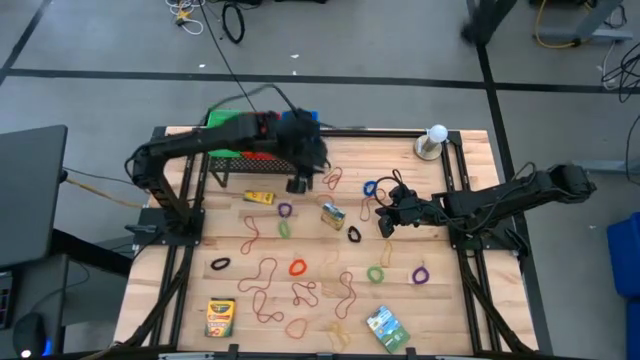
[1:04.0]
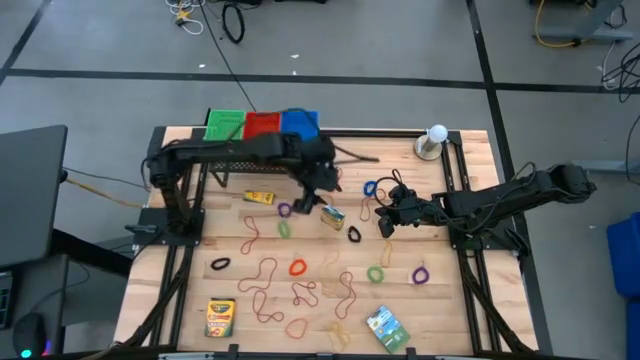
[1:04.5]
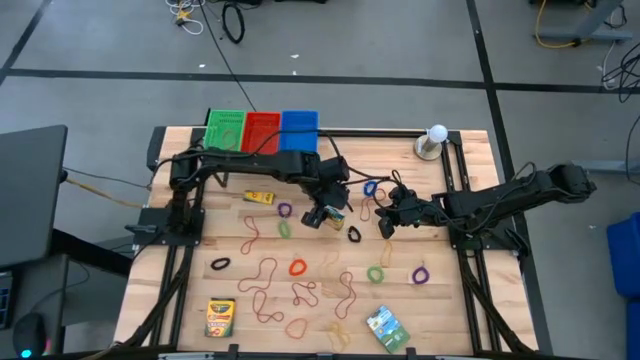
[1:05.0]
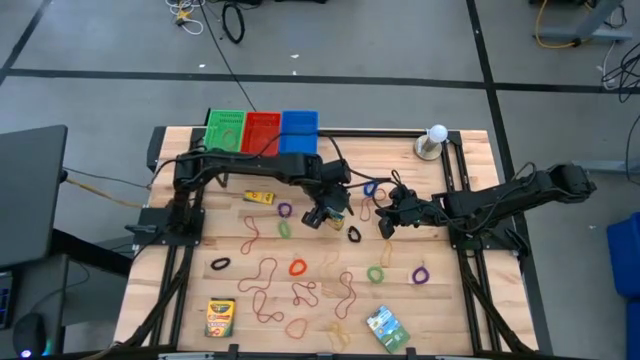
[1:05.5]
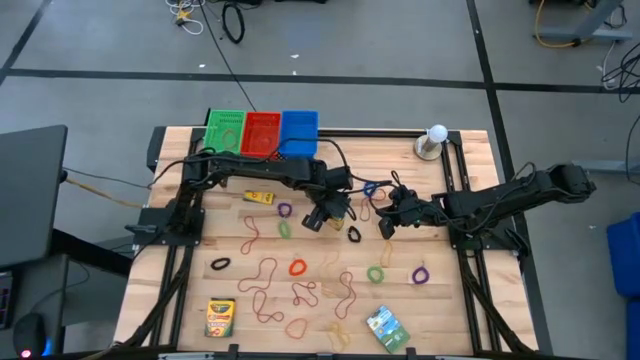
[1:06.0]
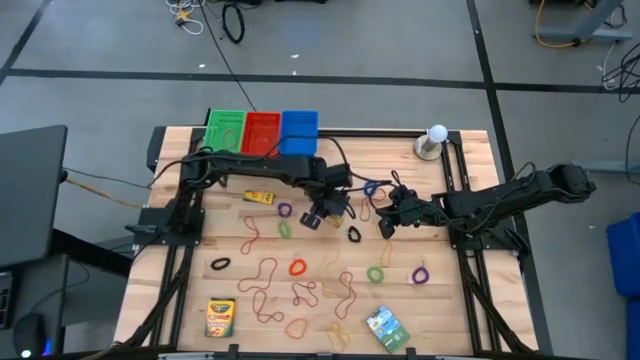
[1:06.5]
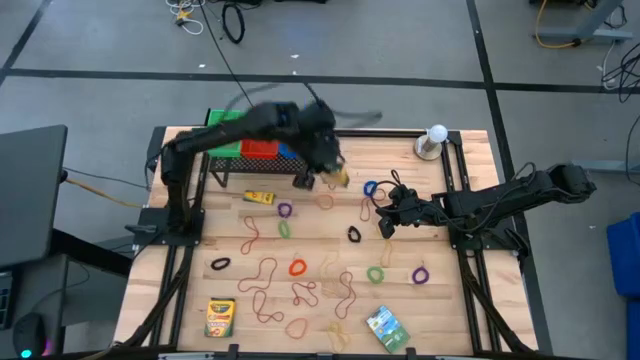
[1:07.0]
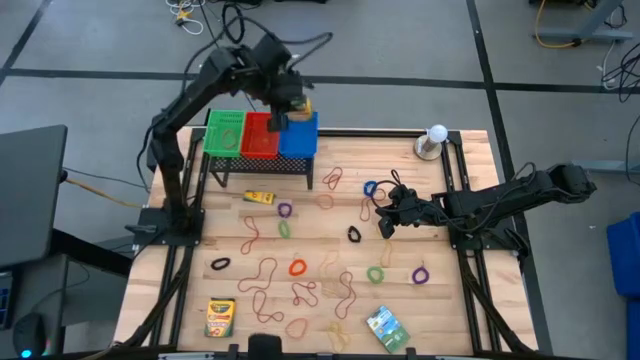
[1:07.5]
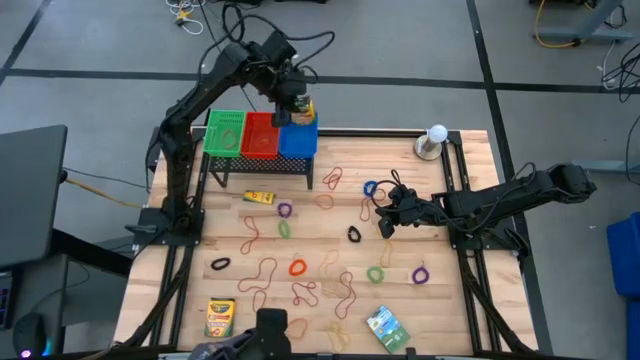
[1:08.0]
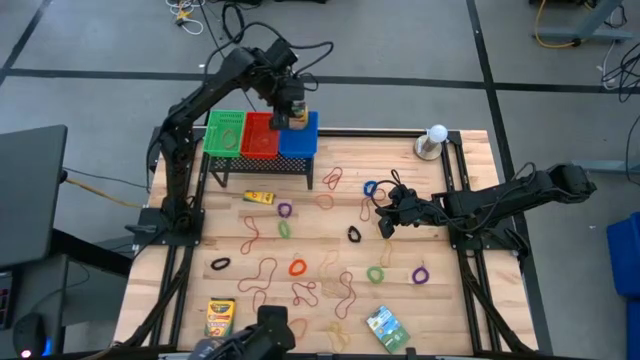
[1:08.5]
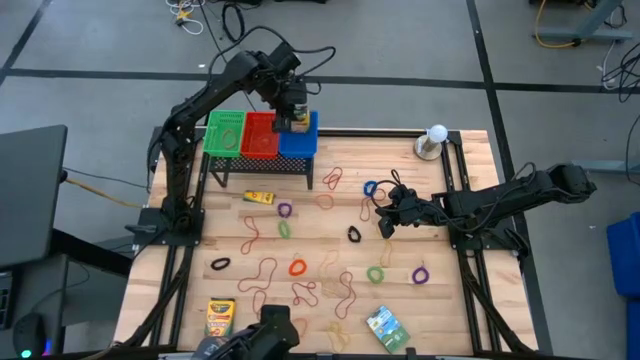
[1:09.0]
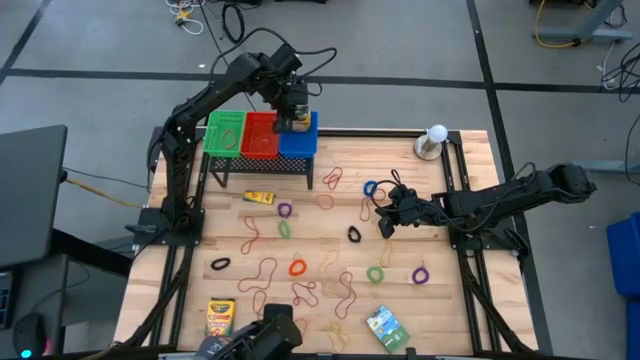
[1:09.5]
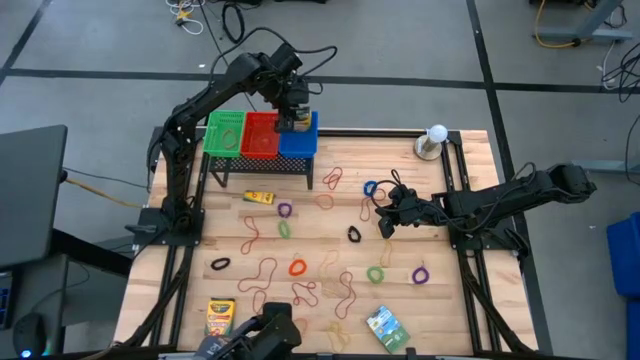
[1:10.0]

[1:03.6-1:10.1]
Task: Pick & Place Office Desk Supplies
Put the big box of crayons into the blue bin on the shelf

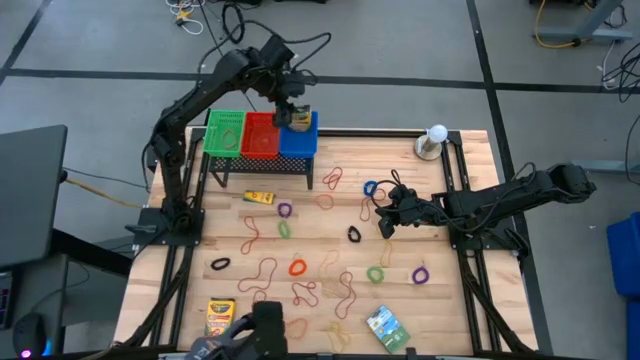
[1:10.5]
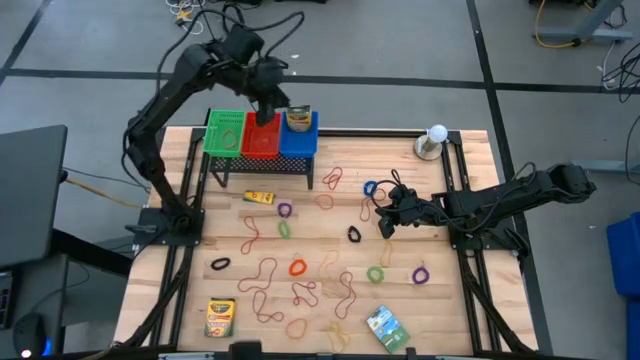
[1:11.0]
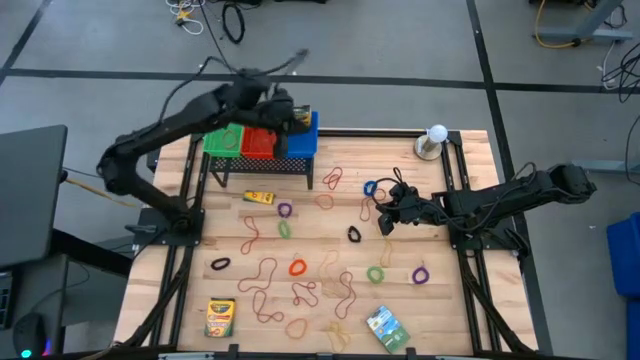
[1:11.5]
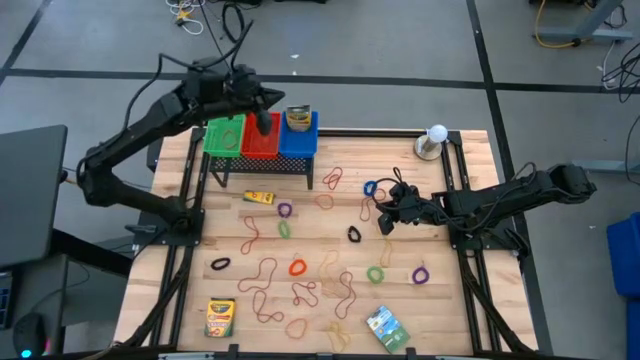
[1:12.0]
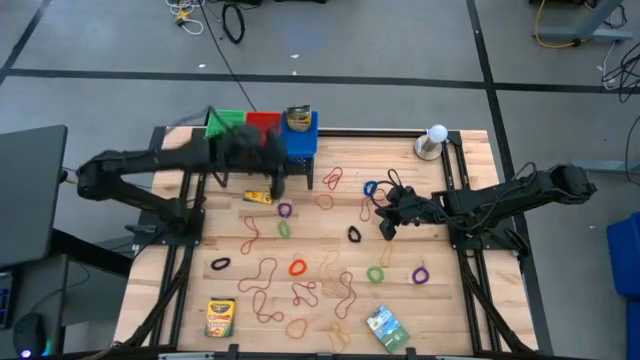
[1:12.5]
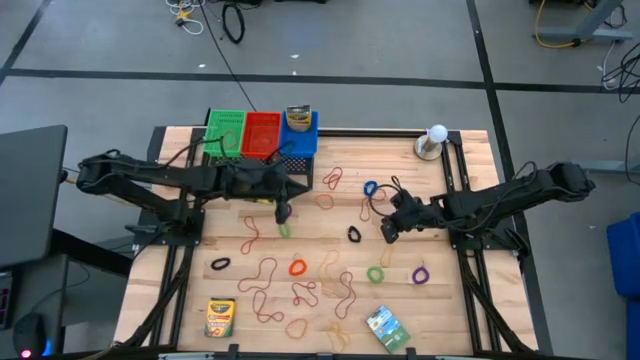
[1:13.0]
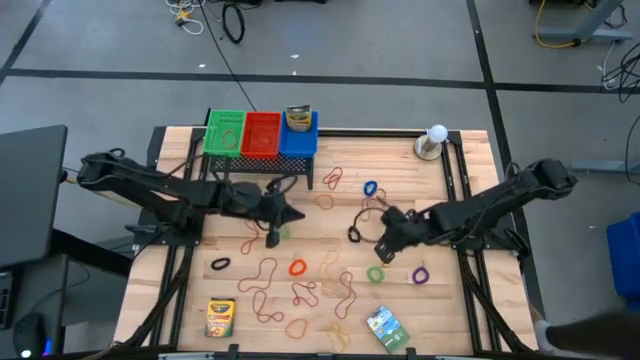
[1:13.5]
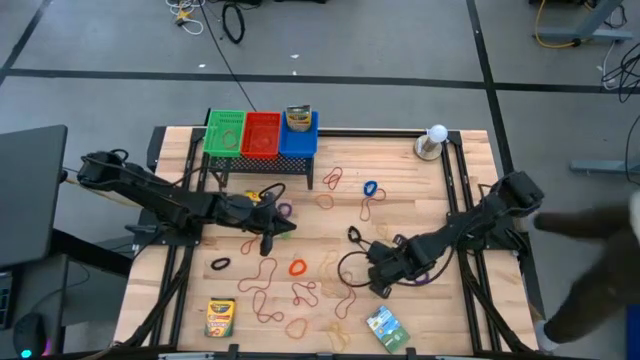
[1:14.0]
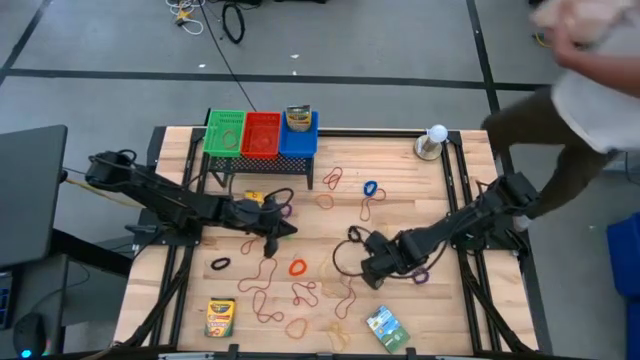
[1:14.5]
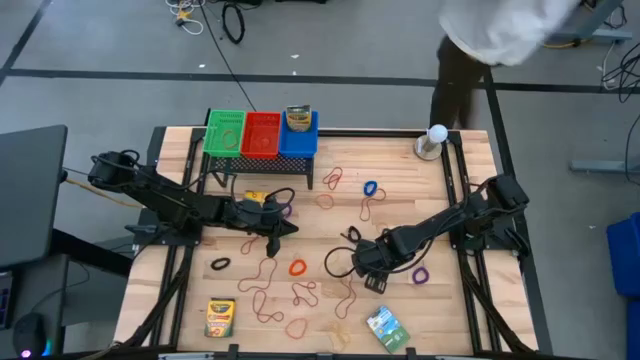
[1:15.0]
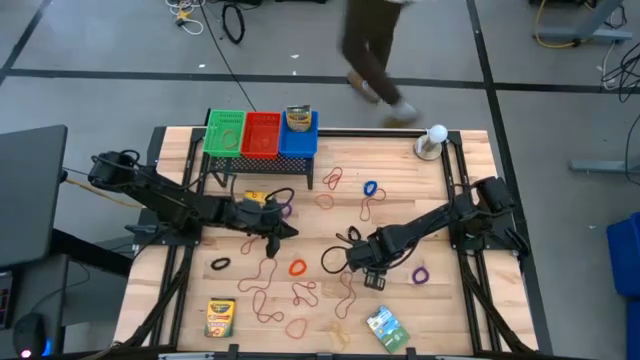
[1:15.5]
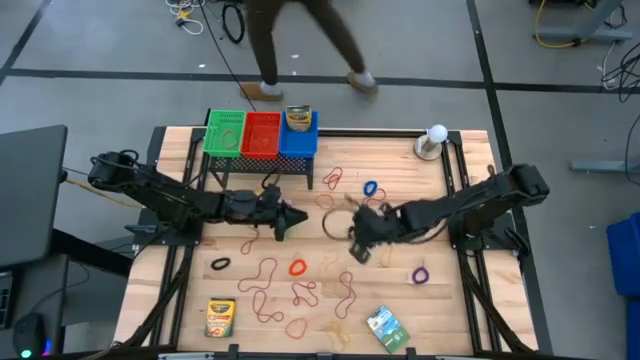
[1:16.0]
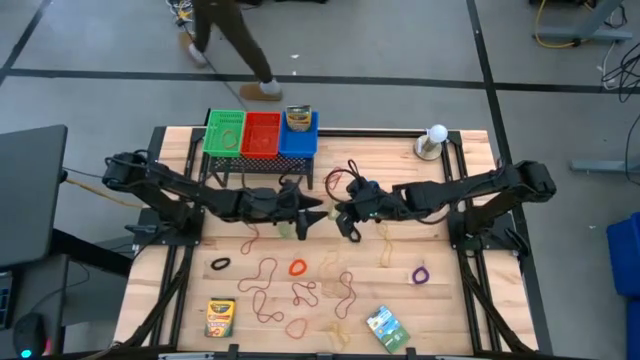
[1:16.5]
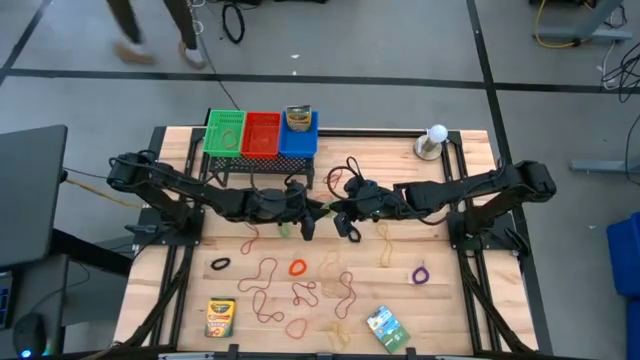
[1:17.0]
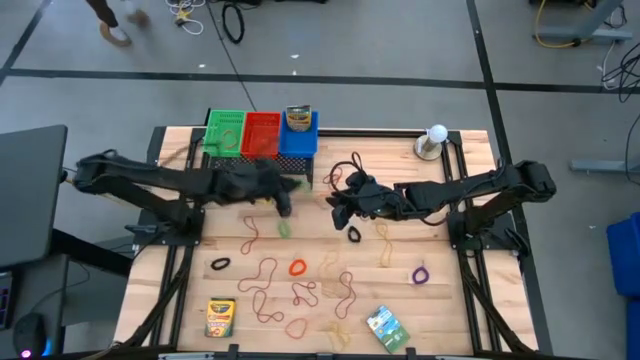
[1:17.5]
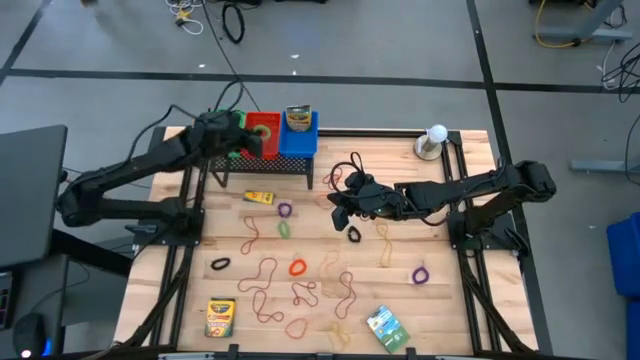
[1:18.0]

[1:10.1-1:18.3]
Put the green spring rubber band into the red bin on the shelf

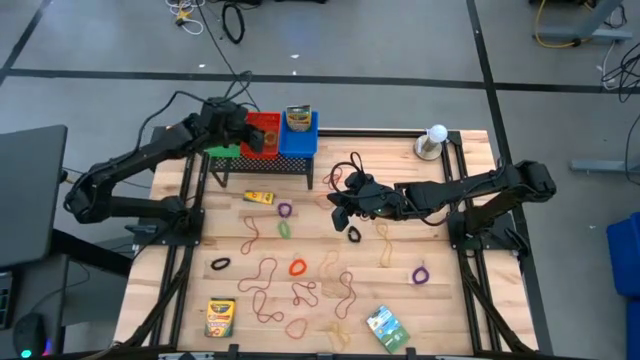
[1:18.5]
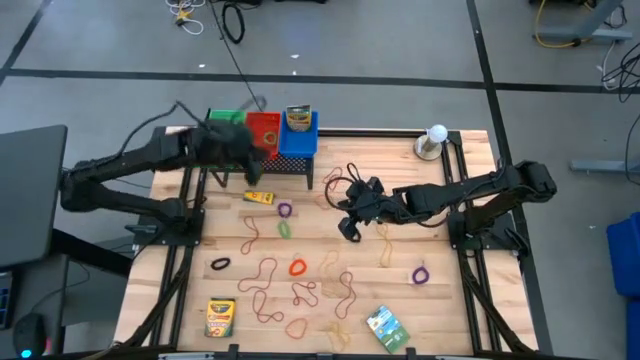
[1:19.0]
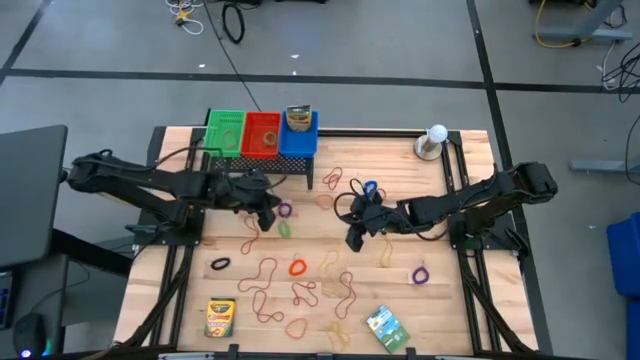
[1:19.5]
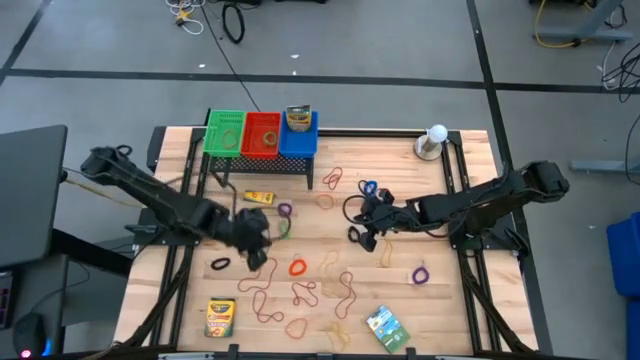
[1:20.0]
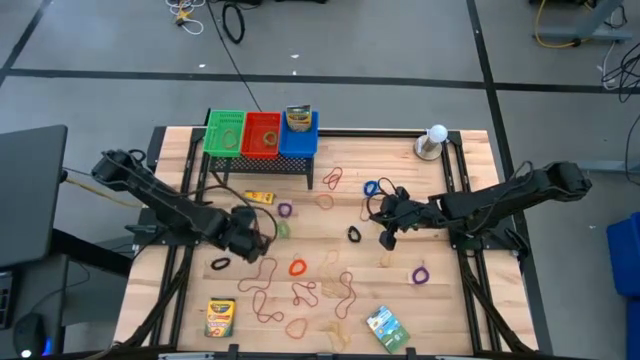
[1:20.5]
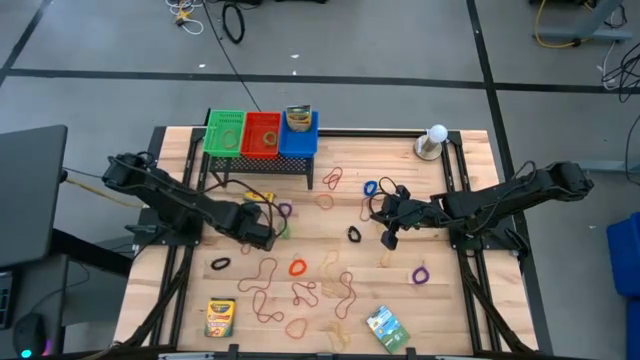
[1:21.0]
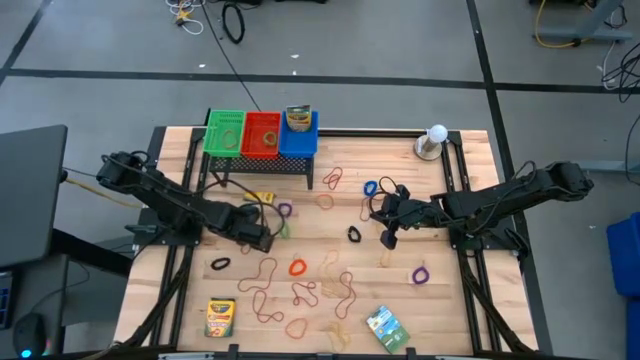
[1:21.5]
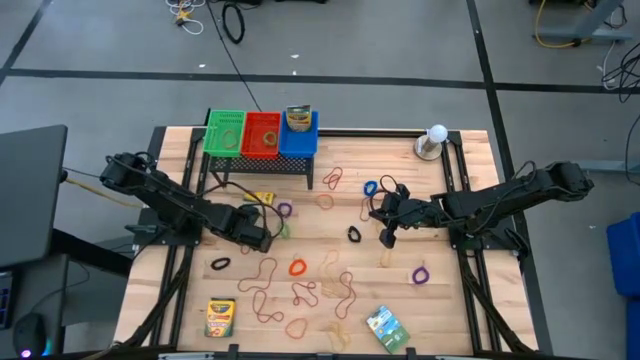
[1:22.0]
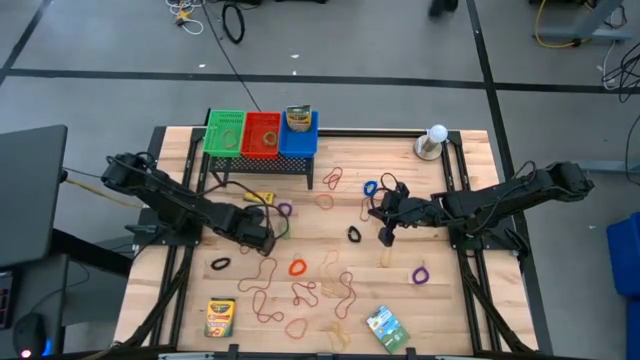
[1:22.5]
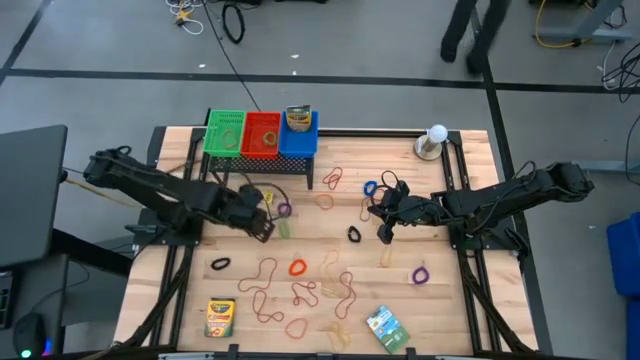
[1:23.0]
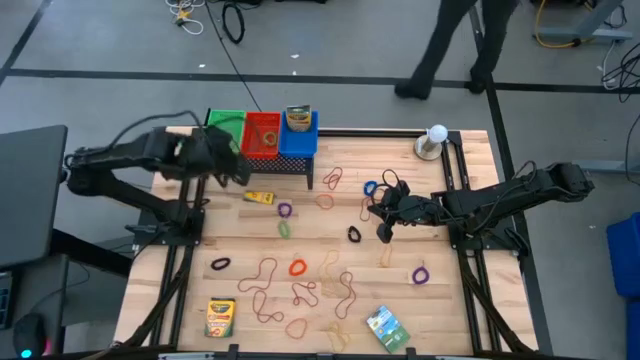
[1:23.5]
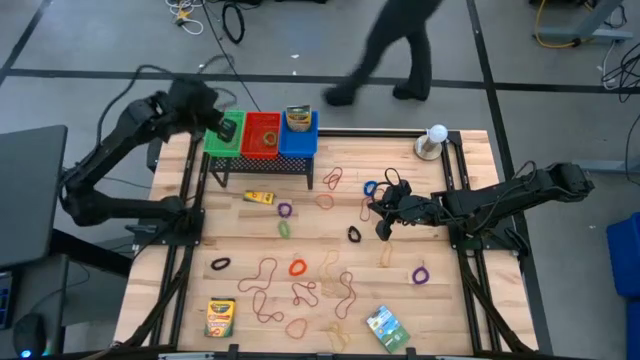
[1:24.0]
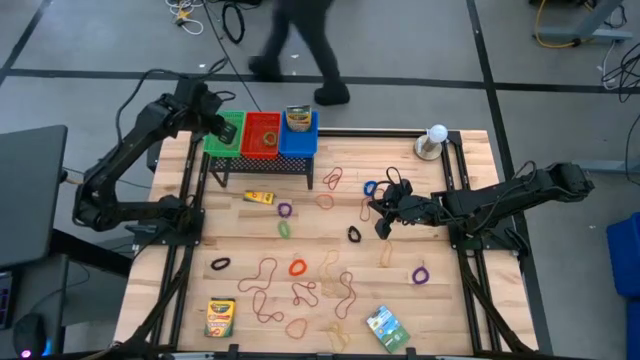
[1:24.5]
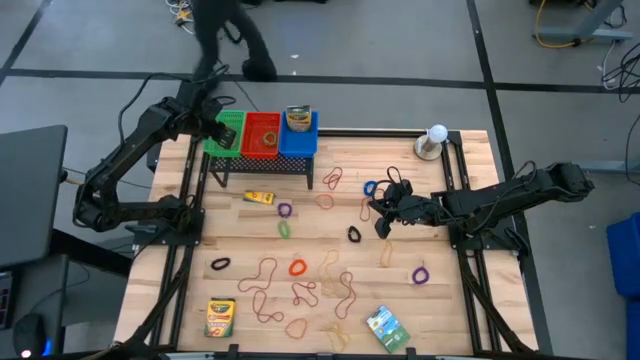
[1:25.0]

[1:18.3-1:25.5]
Put the red rubber band into the green bin on the shelf
